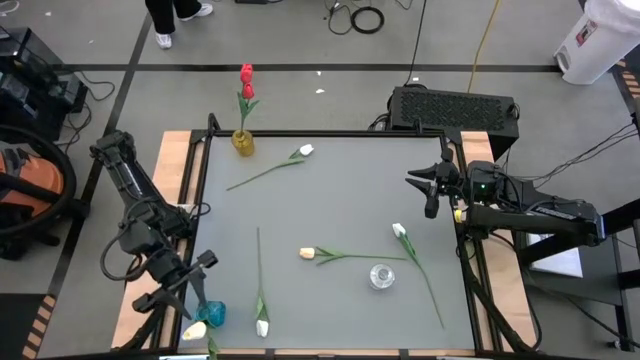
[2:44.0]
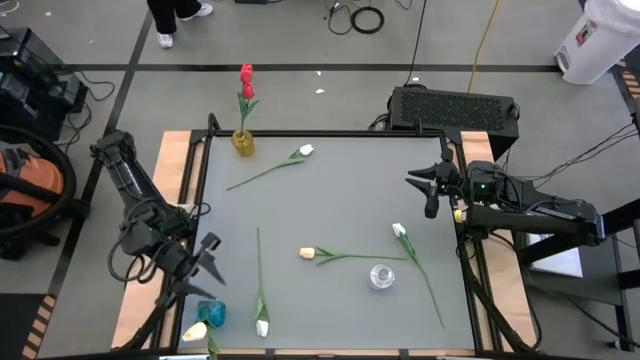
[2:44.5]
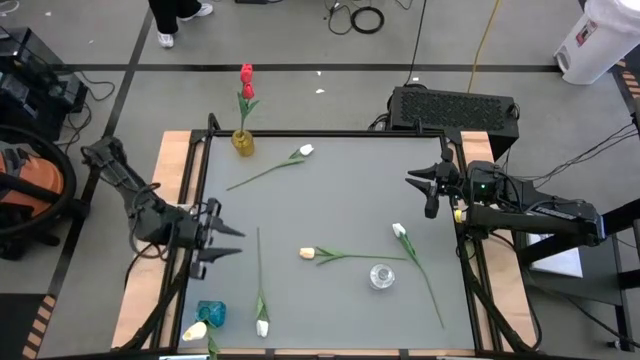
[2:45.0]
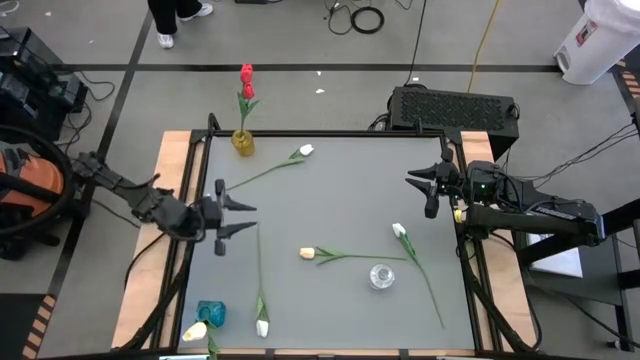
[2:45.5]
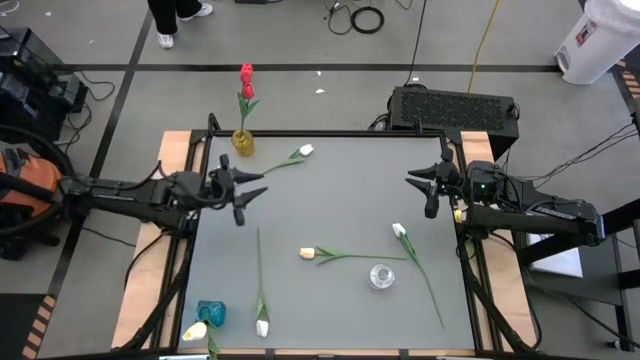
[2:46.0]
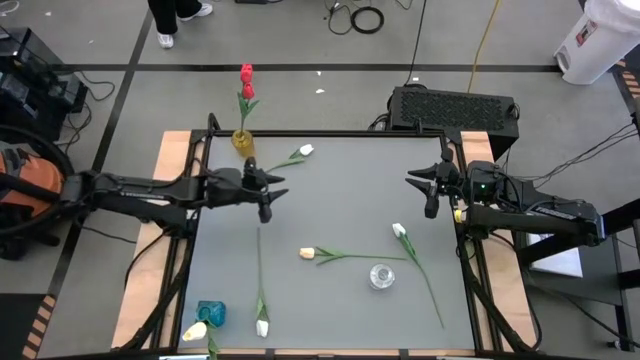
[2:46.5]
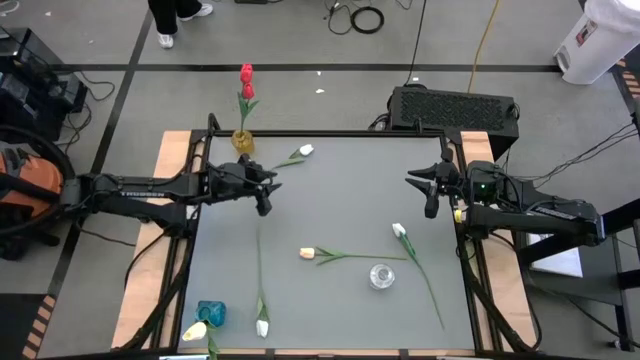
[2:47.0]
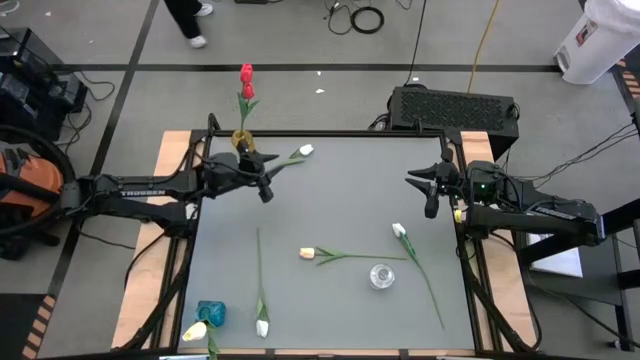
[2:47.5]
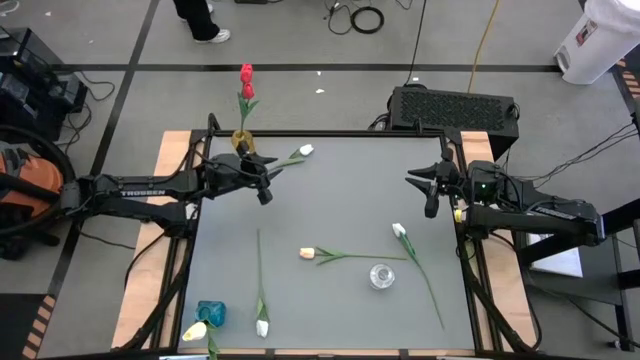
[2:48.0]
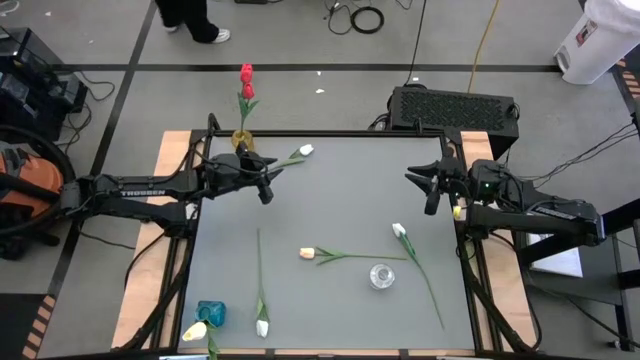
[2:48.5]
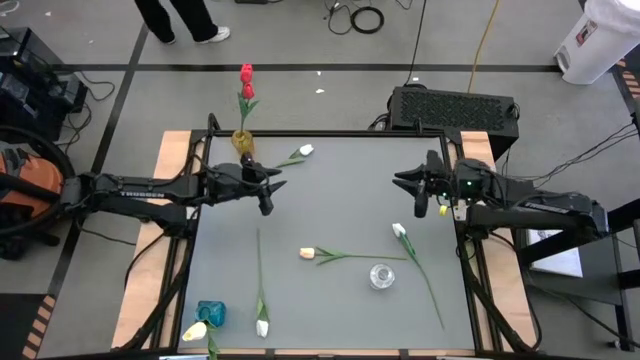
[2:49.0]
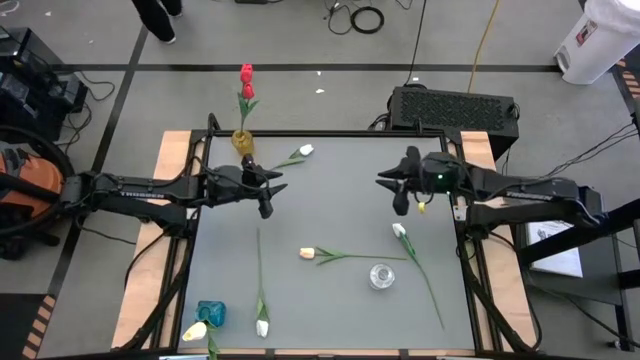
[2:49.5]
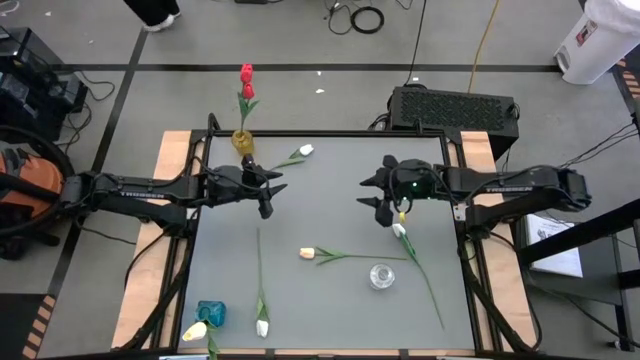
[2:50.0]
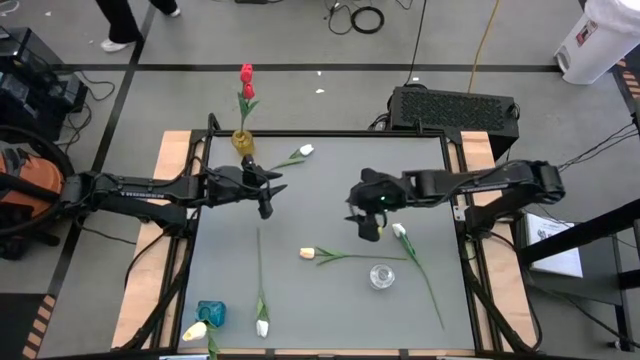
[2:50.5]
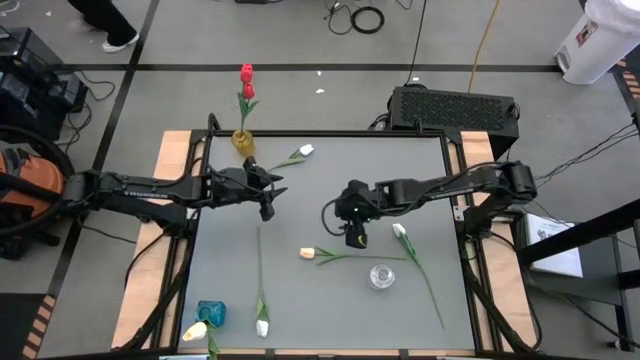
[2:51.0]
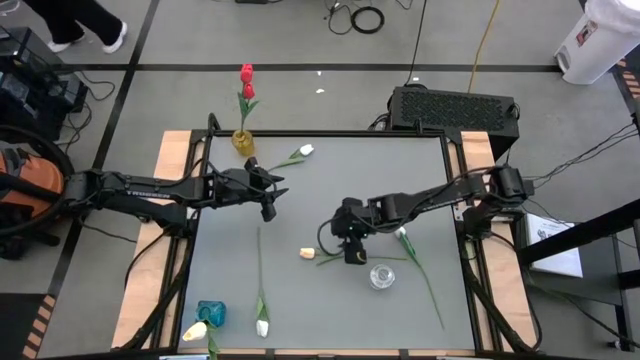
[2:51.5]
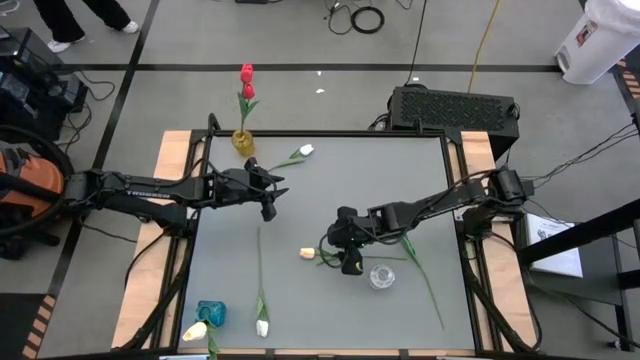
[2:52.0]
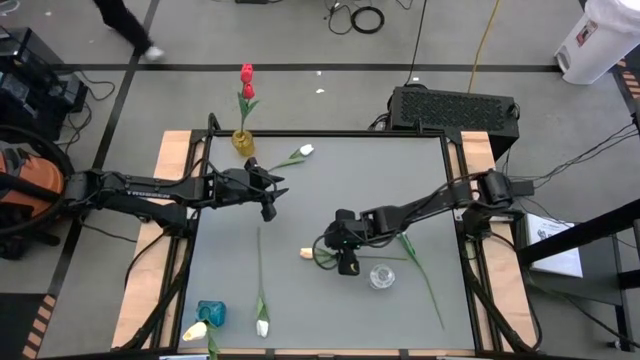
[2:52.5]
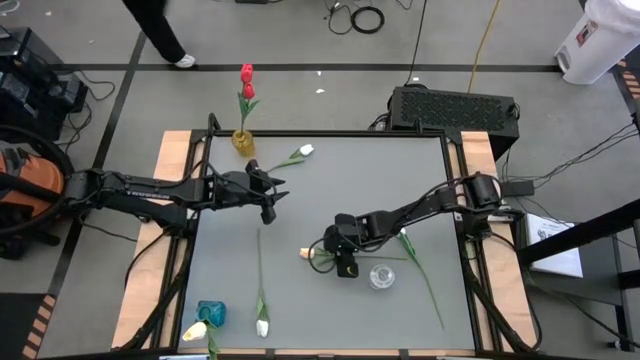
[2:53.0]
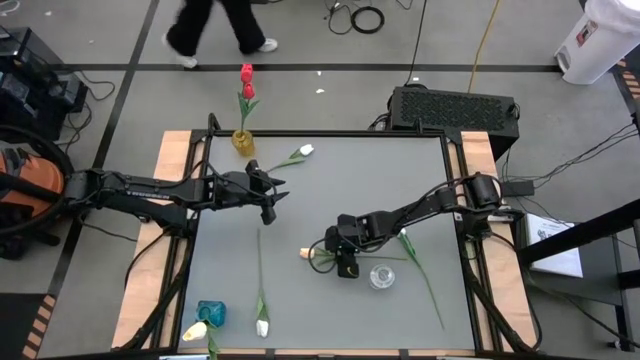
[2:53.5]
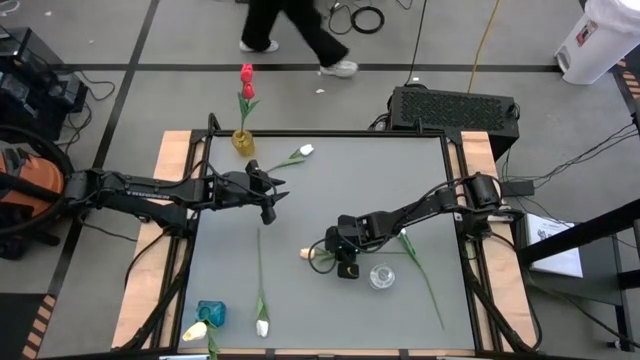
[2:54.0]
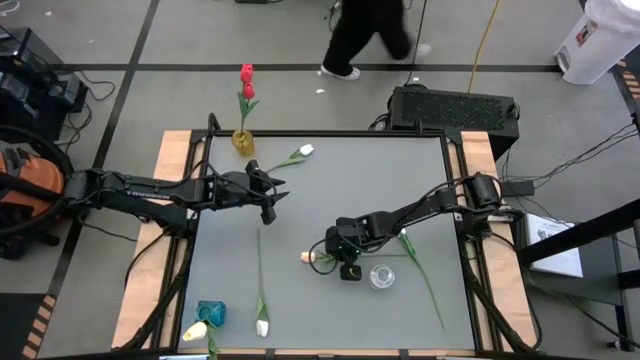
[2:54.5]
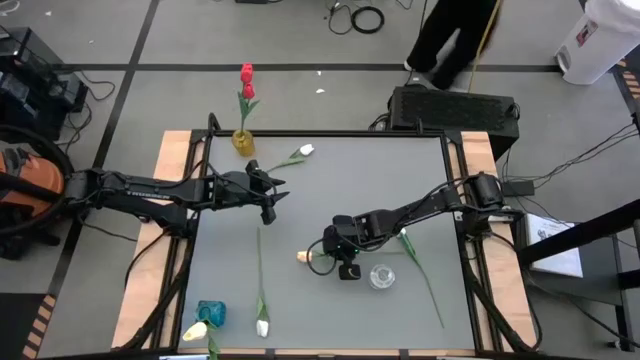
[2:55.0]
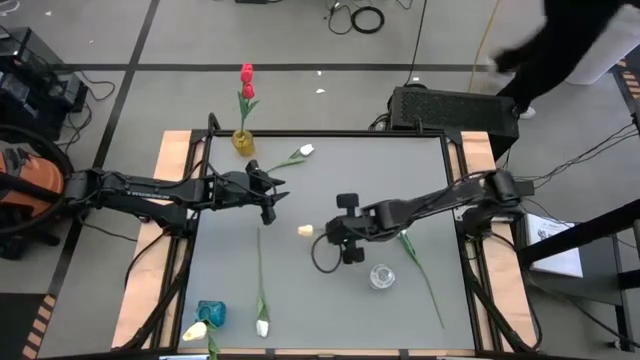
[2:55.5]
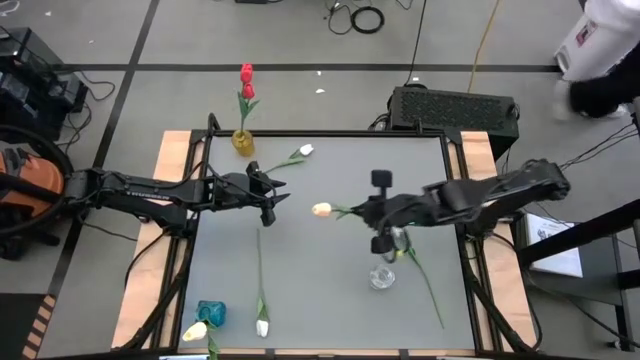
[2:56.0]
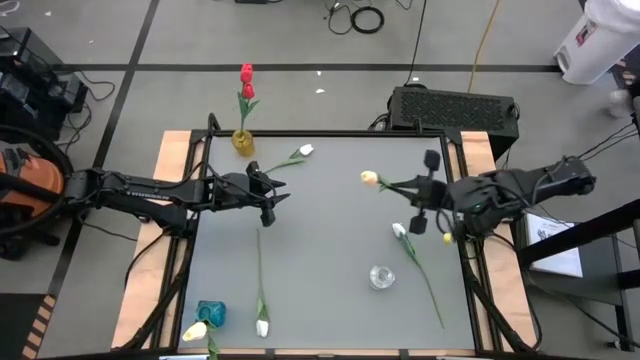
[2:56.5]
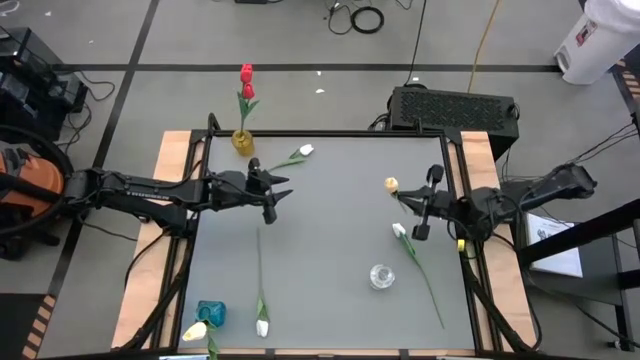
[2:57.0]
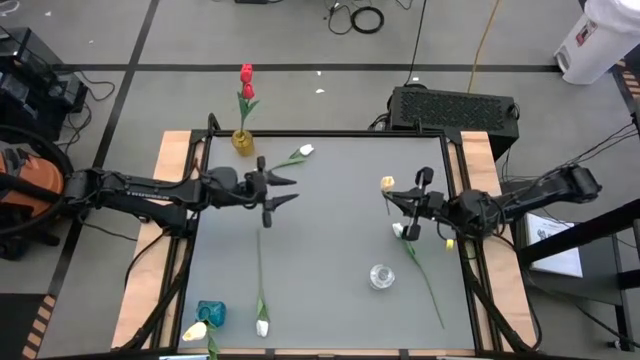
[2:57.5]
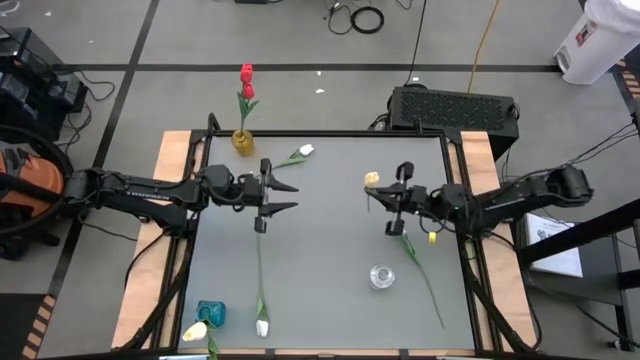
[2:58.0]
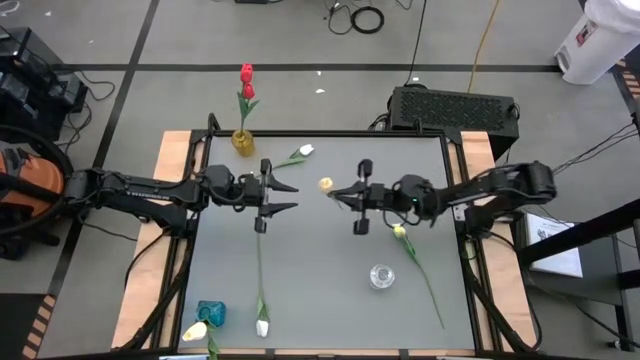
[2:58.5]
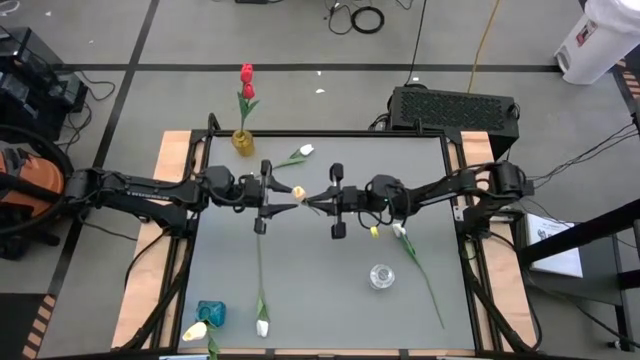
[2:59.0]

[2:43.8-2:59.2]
Task: Sort flowers into vase by color
Put the yellow tulip into the blue vase
